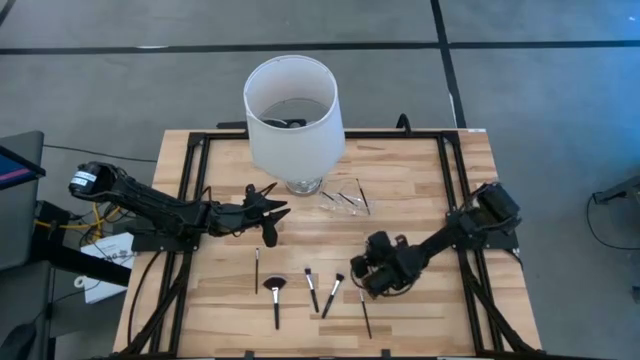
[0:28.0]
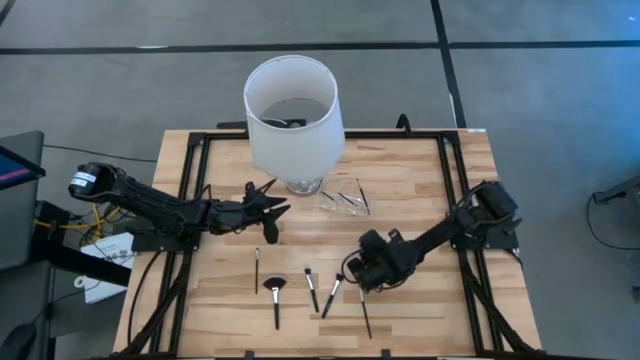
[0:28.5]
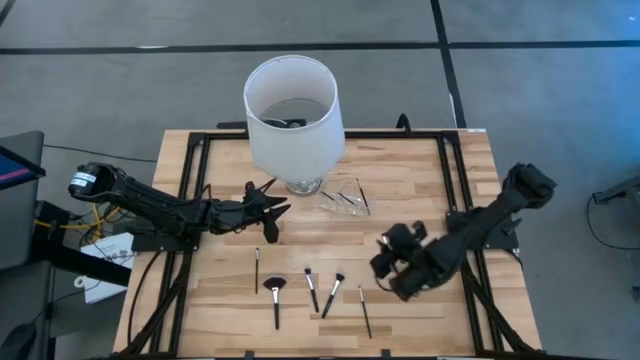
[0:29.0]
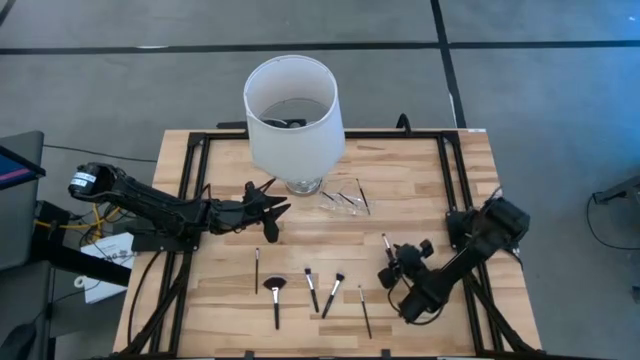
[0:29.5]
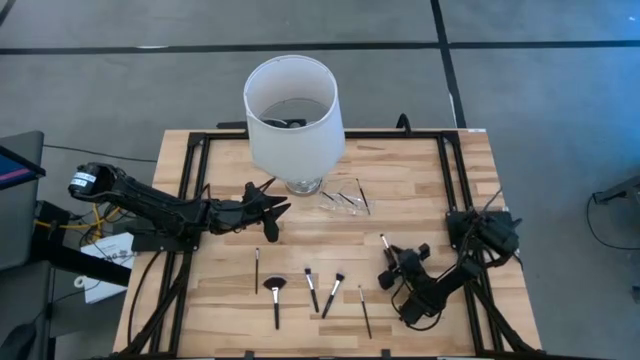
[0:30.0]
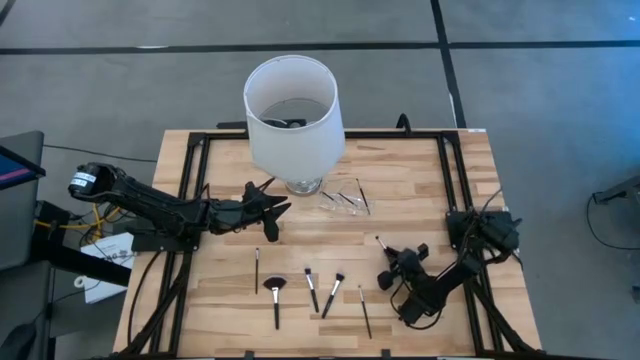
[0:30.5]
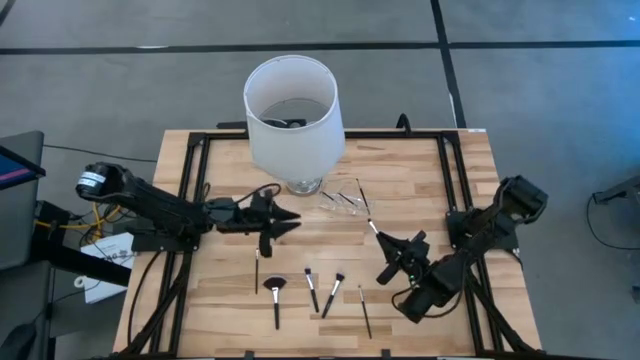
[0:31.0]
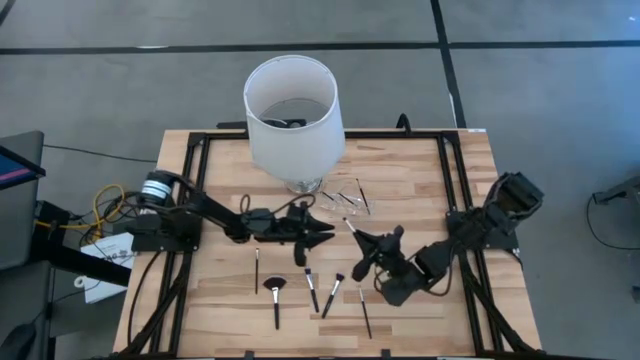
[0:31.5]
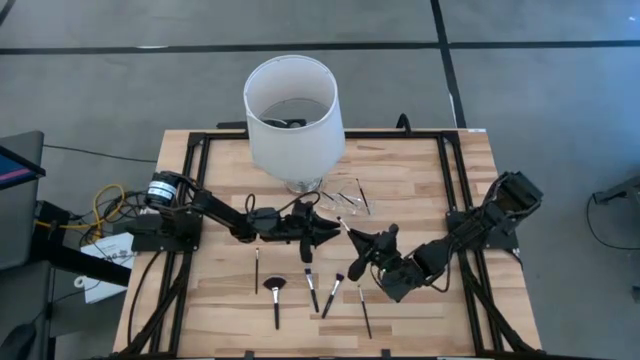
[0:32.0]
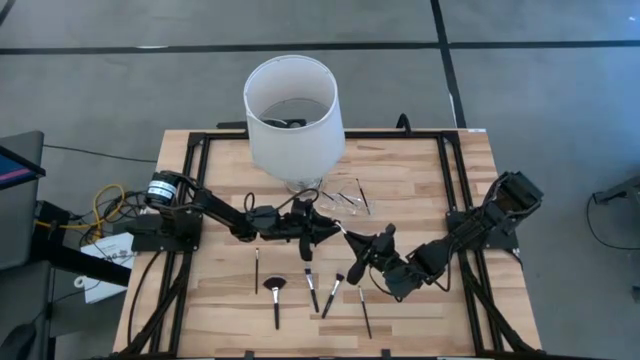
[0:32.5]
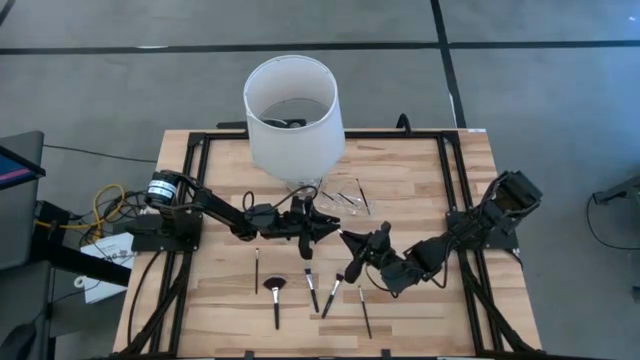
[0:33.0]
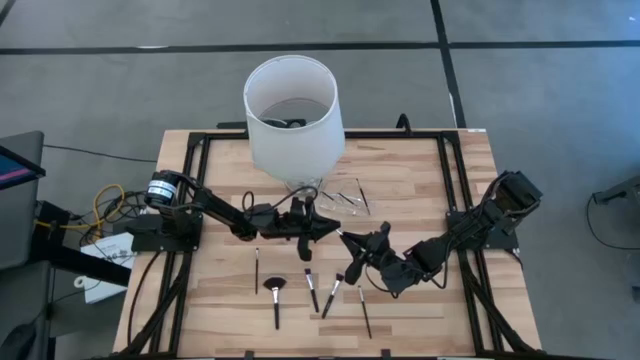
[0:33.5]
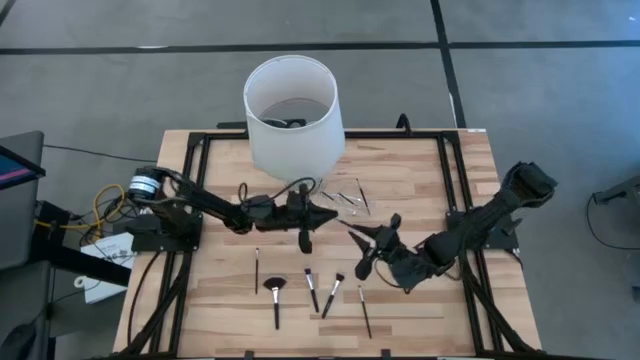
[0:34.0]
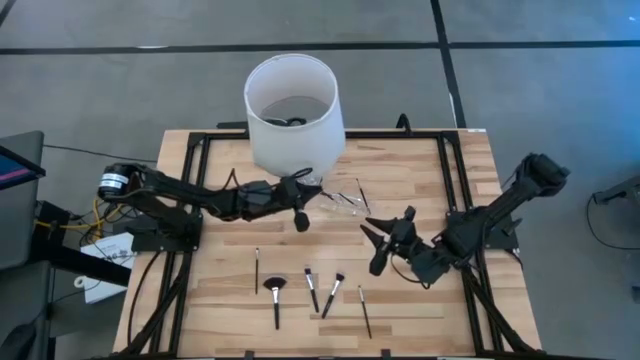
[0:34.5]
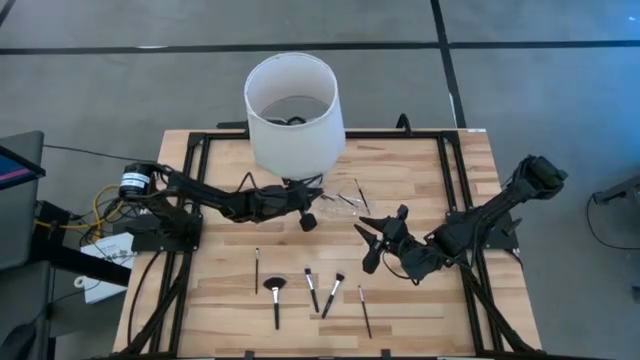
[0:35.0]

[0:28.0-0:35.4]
Task: Put items in baskets/containers
Put the black eyeshadow brush into the transparent organizer

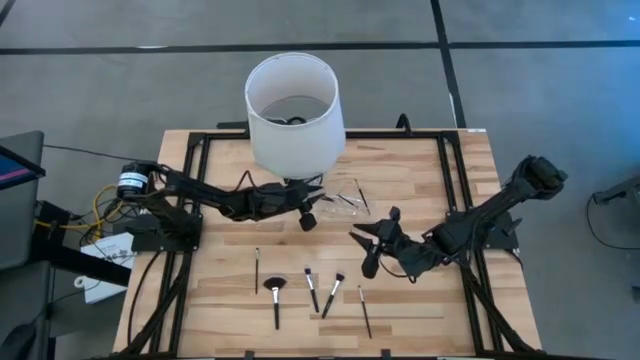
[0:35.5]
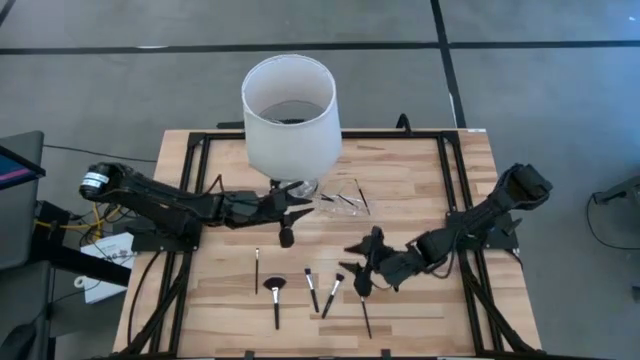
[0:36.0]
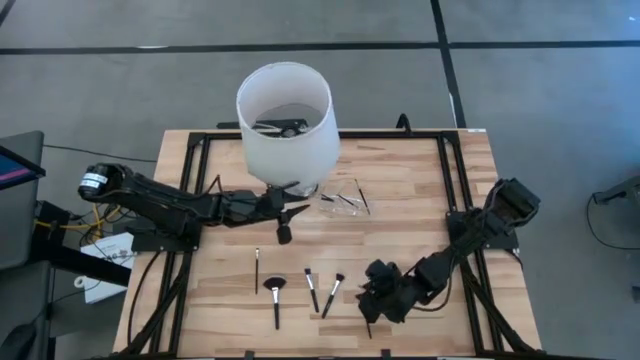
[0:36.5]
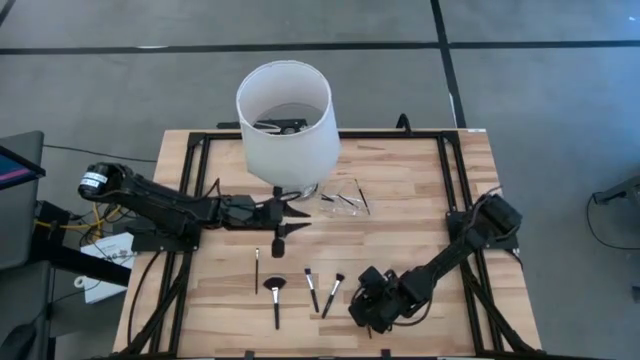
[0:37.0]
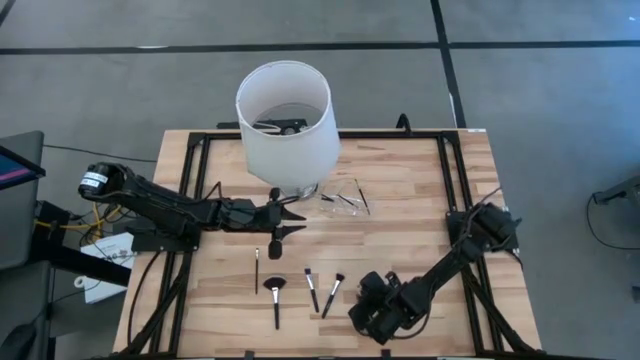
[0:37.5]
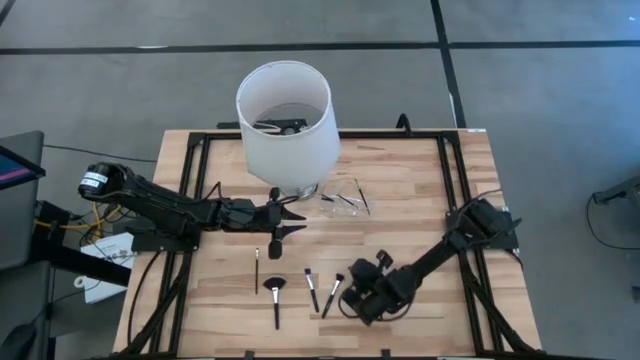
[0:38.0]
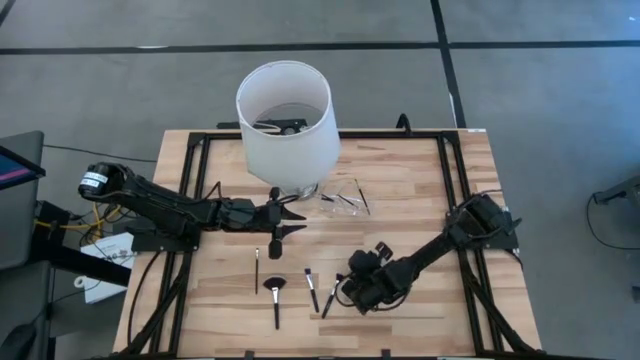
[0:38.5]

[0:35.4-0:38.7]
Put the black eyeshadow brush into the transparent organizer

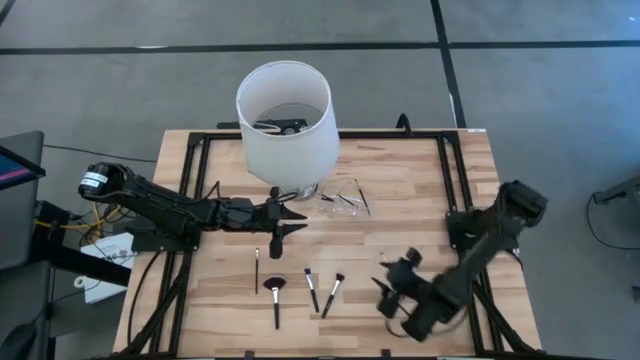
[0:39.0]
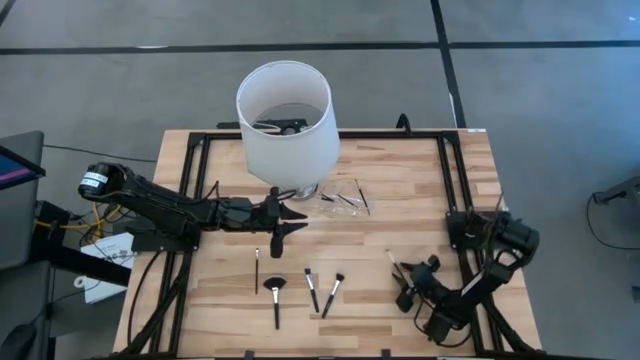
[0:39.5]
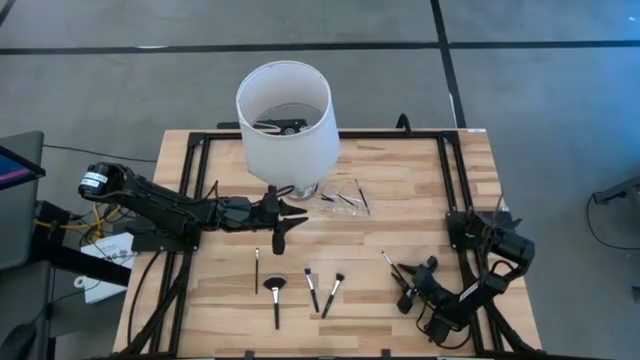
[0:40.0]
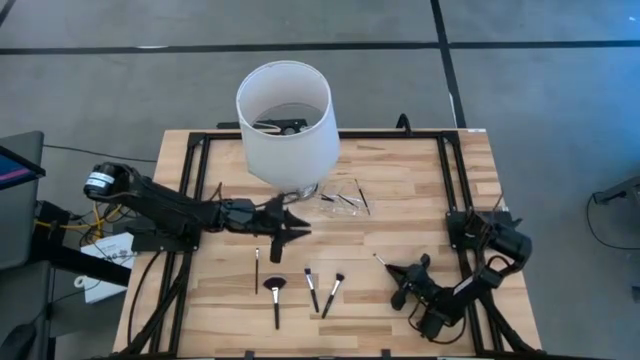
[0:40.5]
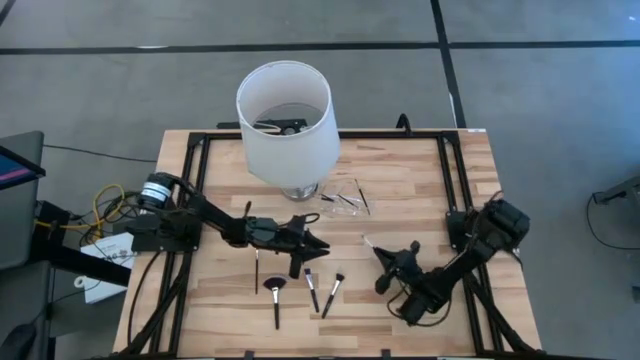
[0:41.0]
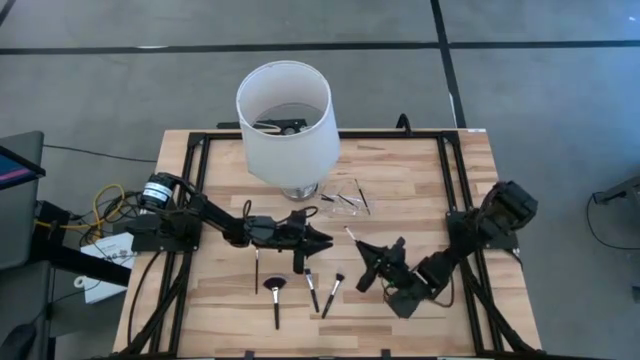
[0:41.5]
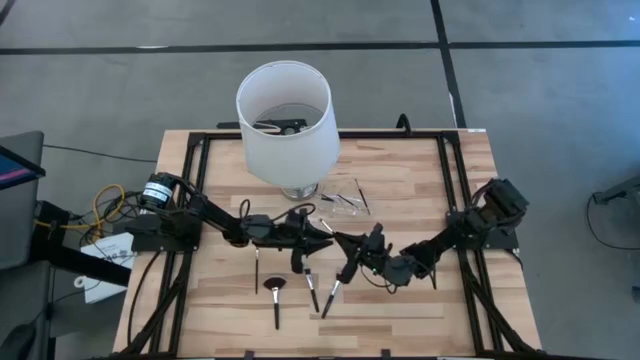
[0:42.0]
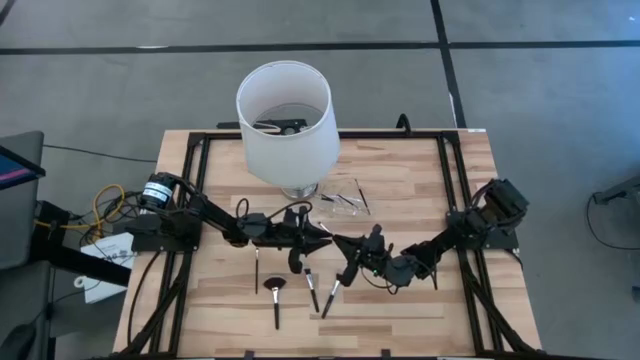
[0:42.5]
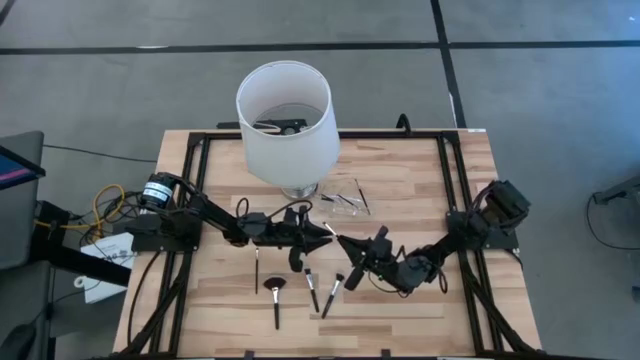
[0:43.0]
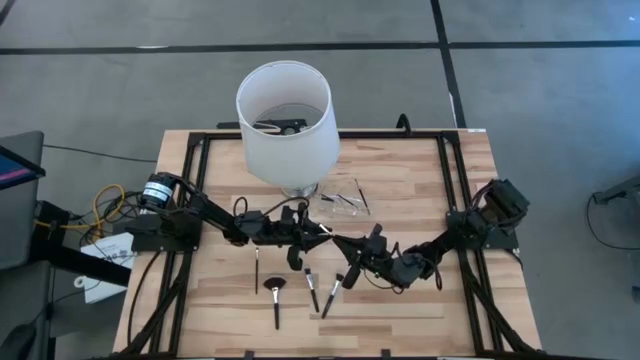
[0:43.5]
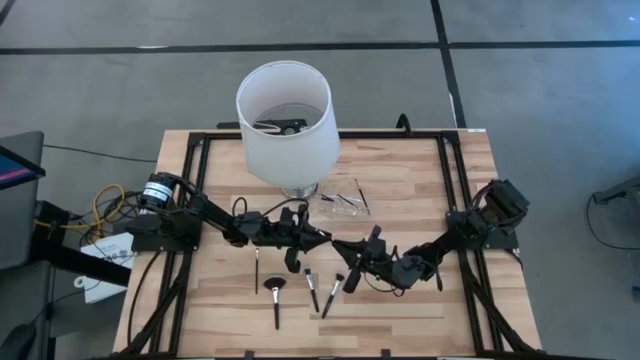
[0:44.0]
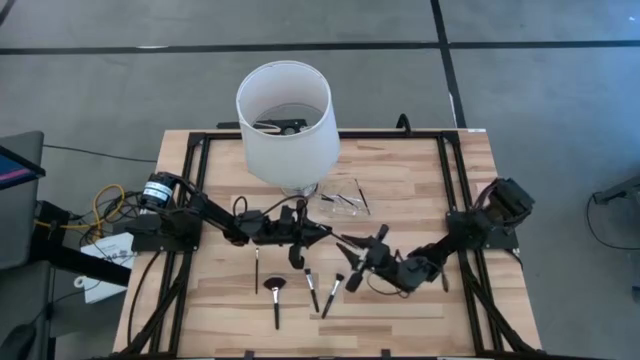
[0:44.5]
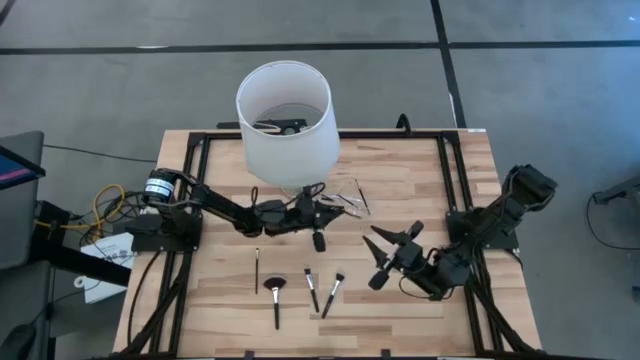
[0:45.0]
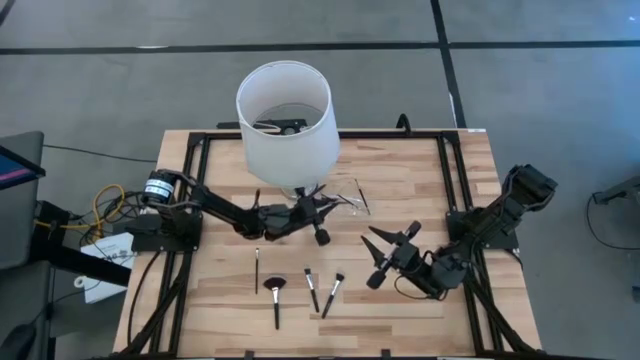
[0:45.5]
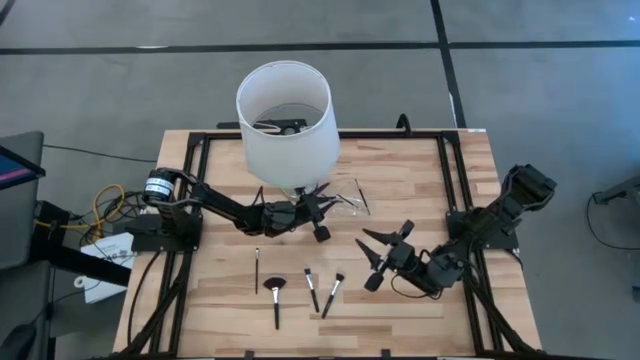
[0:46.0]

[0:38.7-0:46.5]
Put the black eyeshadow brush into the transparent organizer

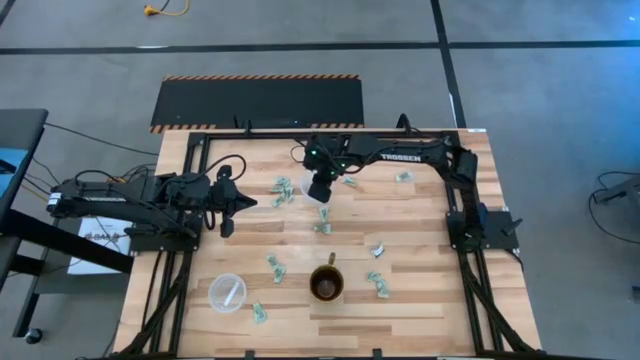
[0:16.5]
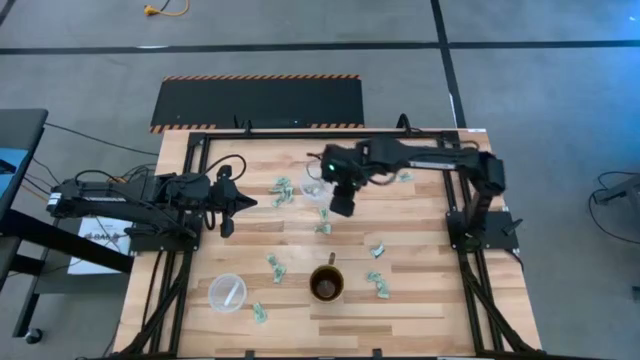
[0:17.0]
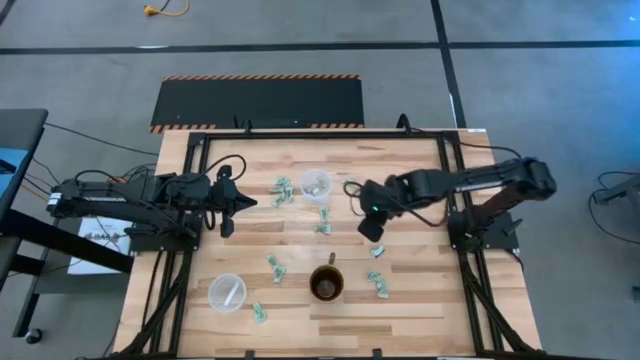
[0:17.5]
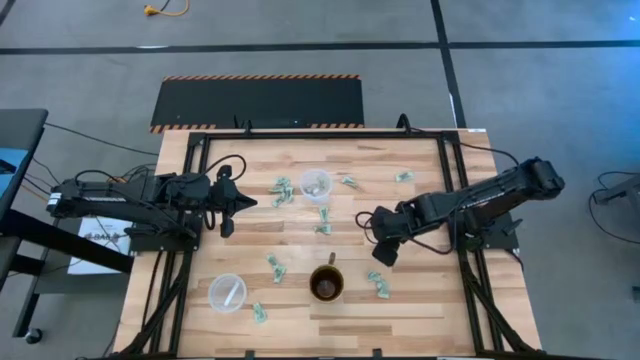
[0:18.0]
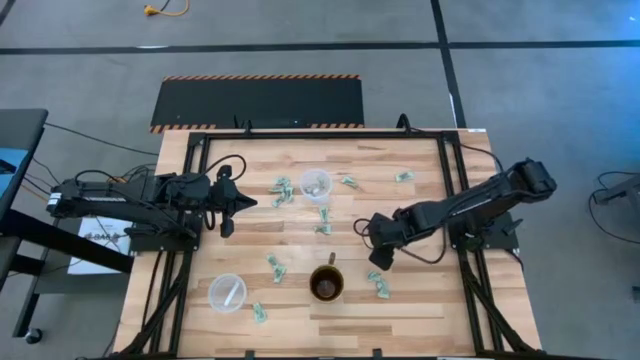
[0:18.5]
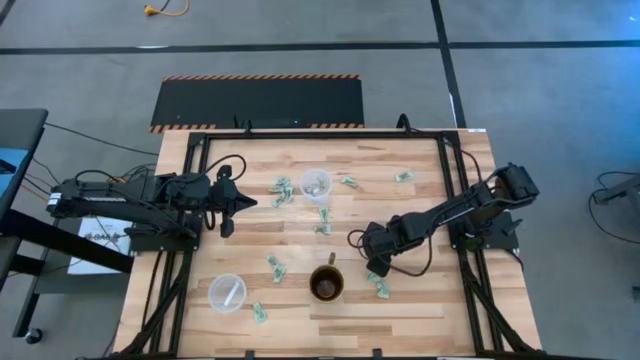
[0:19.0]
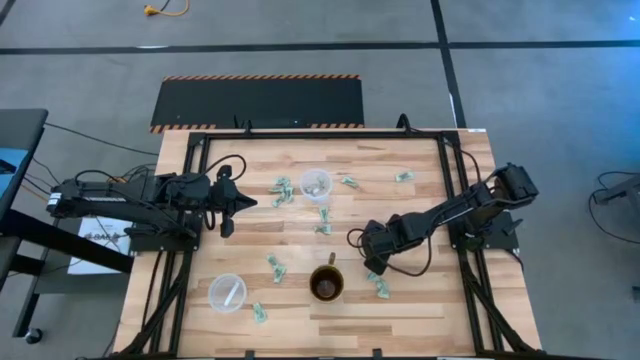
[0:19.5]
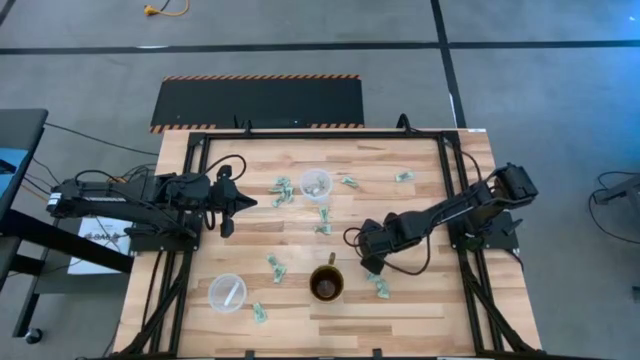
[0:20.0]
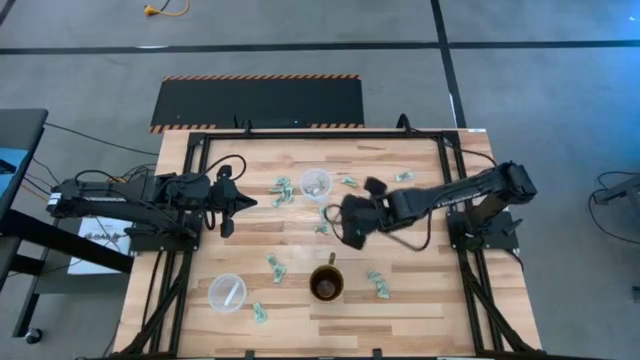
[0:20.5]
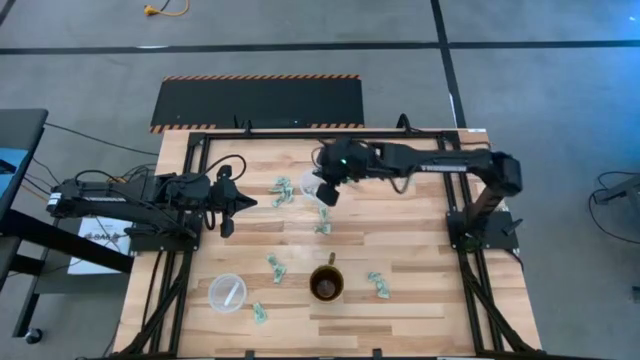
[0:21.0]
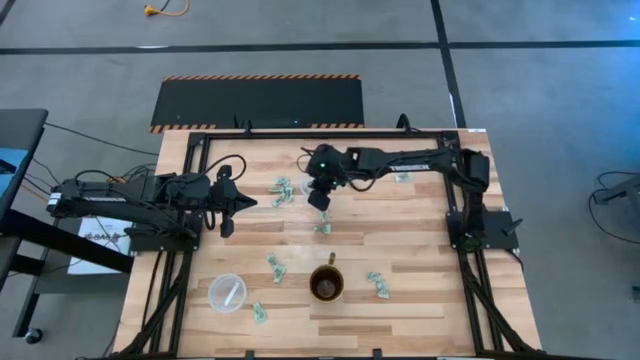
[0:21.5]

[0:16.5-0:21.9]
Task: Pick and place items into bin
Put the stevia packet into the top transparent bin
